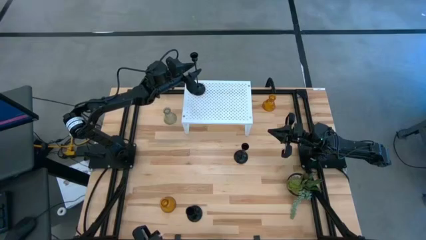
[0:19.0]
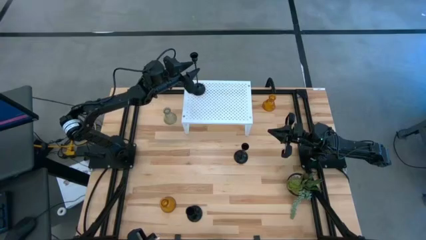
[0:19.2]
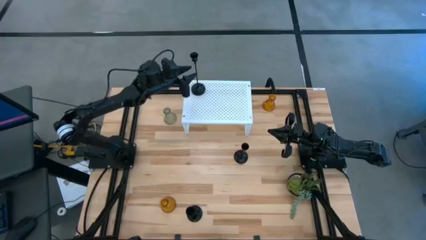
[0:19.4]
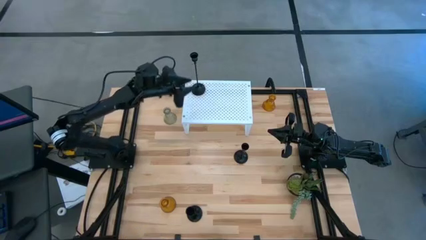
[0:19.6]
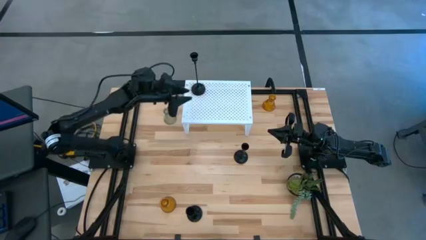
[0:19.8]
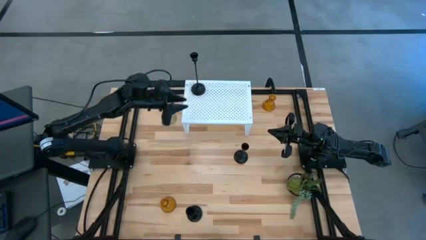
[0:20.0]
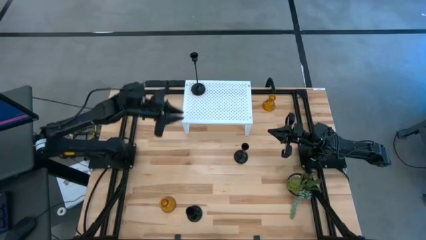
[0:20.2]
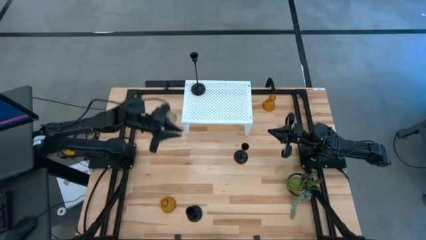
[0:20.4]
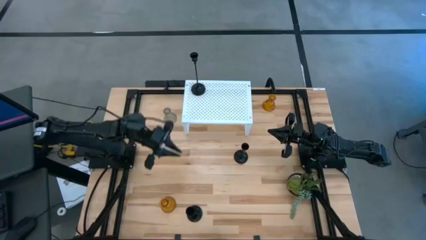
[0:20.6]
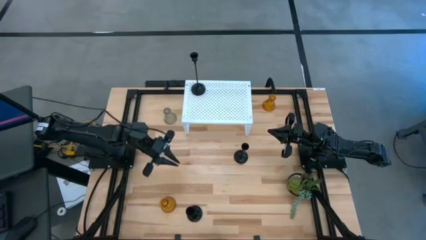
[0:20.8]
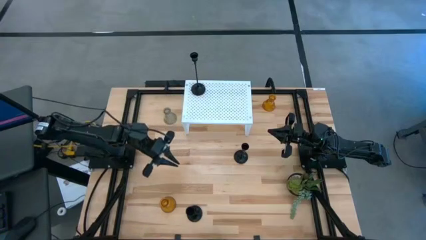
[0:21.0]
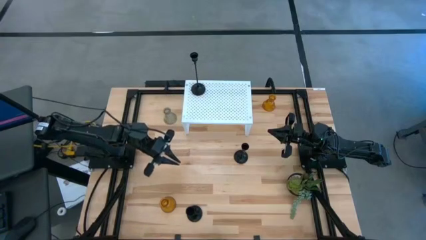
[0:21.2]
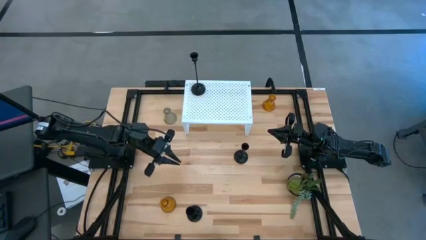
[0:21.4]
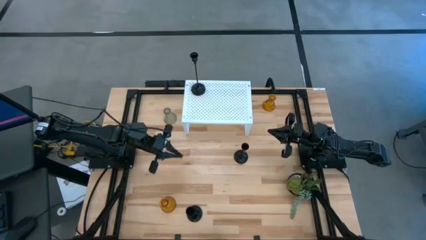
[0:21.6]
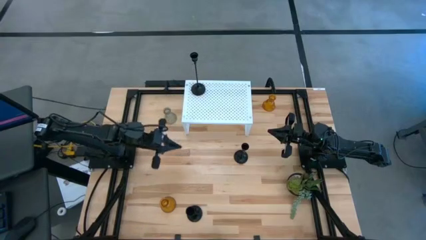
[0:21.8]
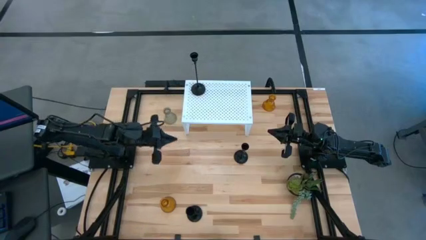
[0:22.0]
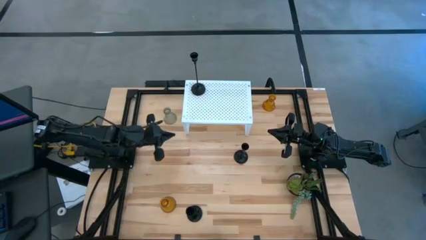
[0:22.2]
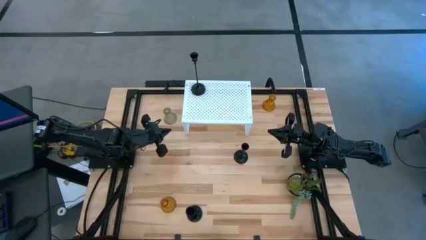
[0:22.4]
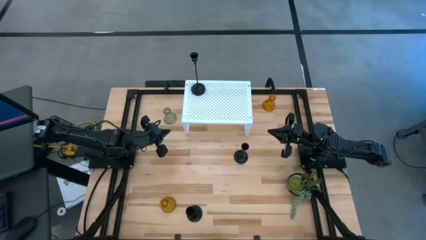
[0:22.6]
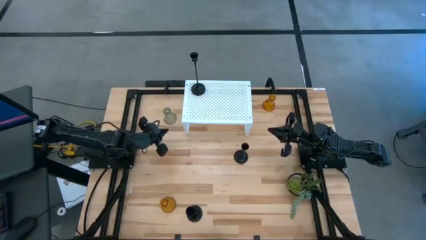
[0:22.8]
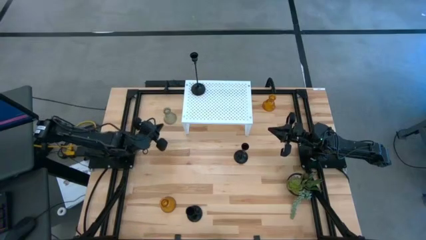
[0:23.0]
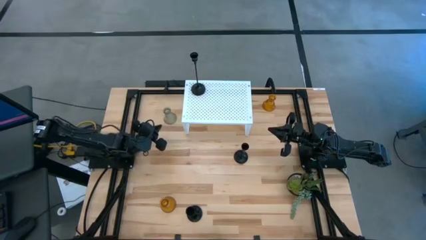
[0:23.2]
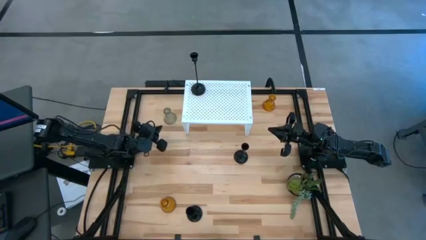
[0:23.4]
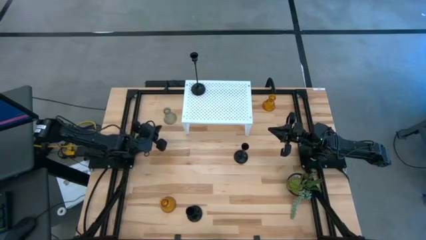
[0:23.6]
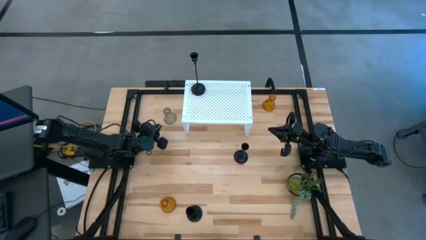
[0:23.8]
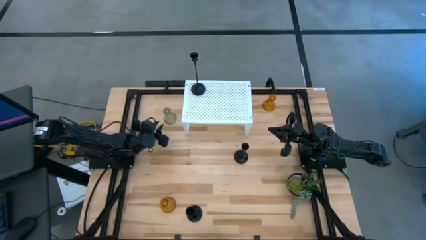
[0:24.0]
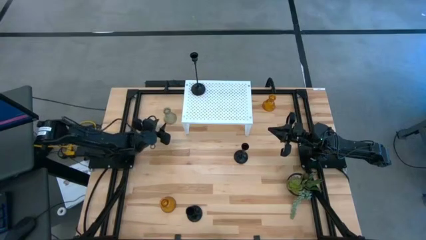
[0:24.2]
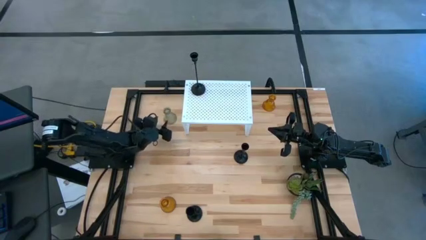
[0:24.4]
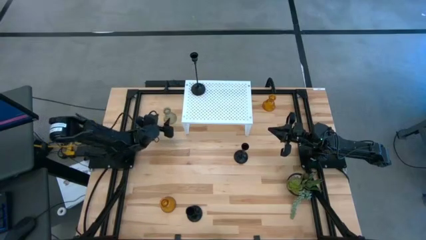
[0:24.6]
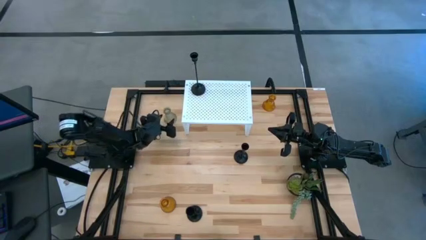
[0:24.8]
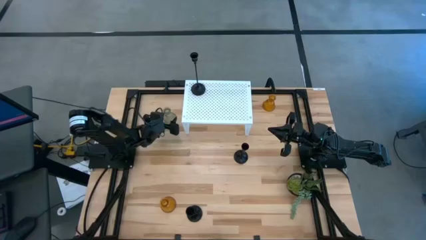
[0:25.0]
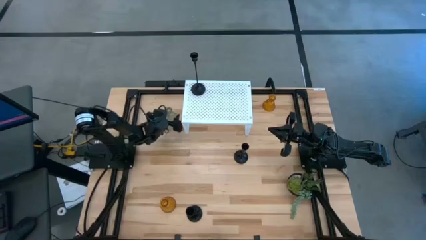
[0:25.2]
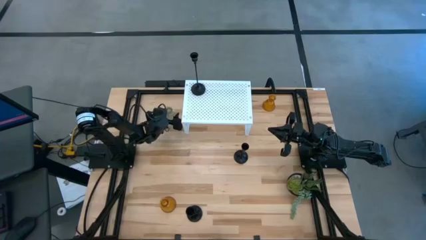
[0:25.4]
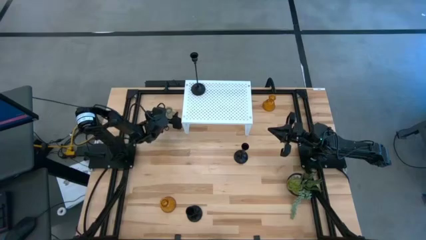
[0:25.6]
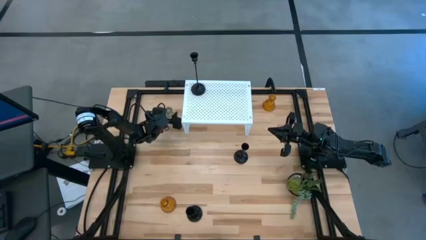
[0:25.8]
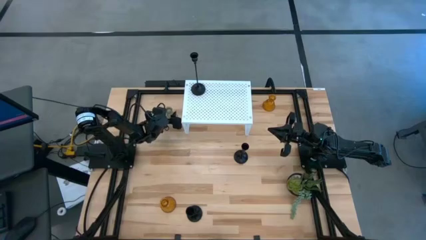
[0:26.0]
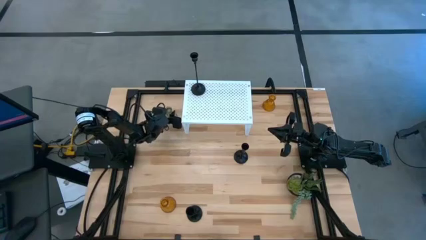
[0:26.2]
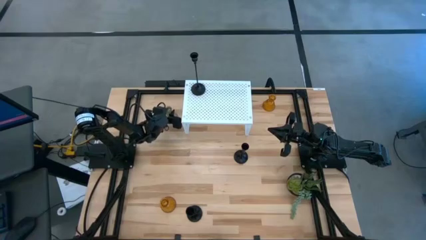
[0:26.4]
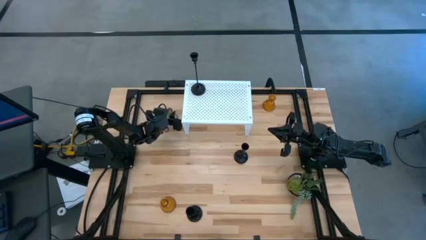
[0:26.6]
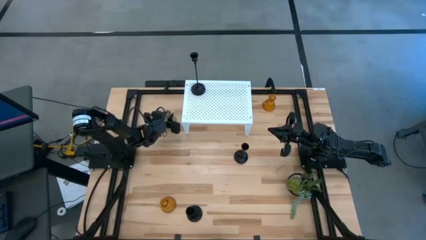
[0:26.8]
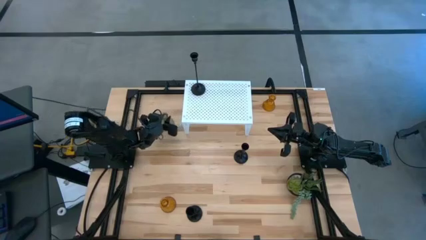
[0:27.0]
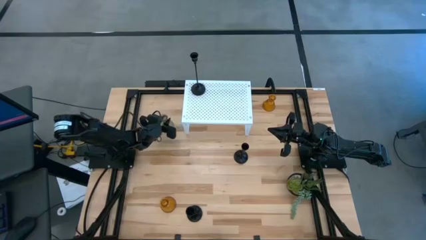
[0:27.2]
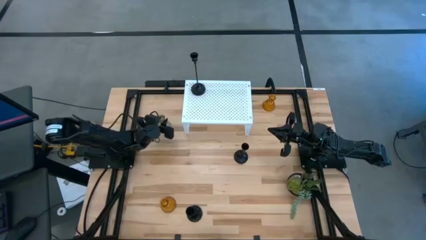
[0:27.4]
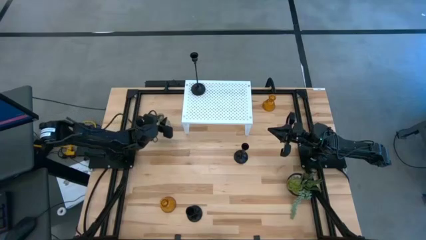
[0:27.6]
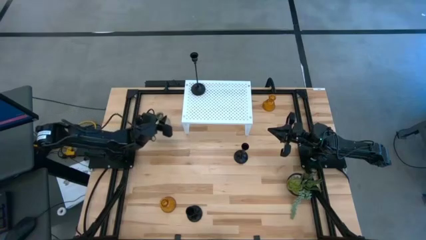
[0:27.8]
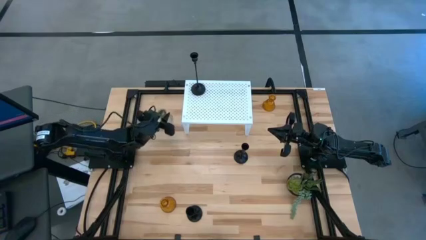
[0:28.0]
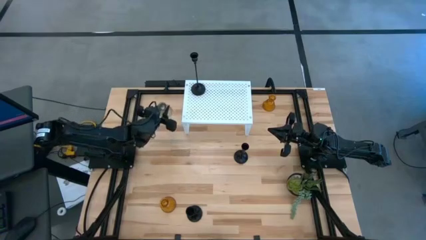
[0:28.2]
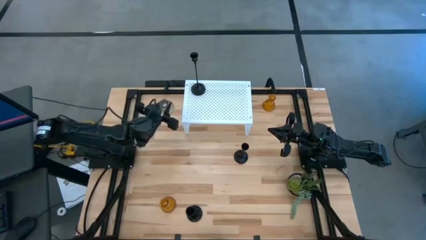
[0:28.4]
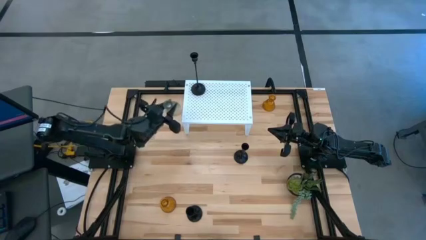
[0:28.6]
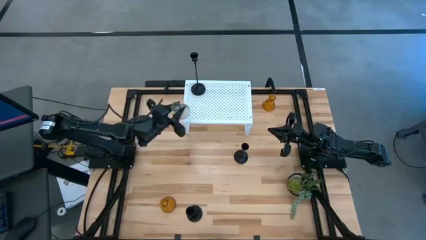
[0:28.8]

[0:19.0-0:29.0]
Task: Pick & Place candle stick holders
Put the transparent glass candle holder on the shelf

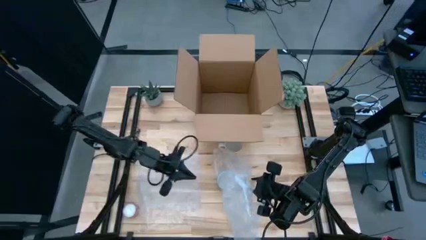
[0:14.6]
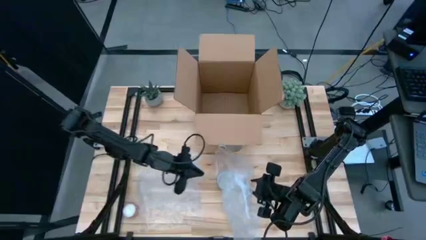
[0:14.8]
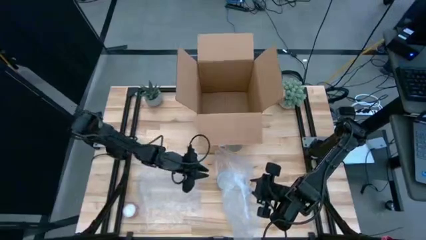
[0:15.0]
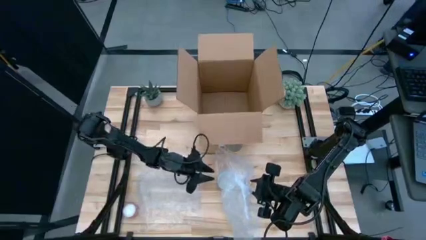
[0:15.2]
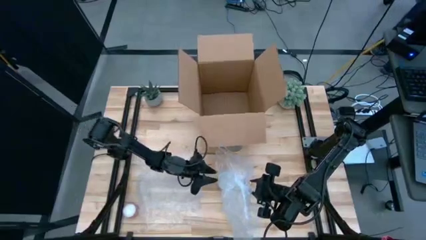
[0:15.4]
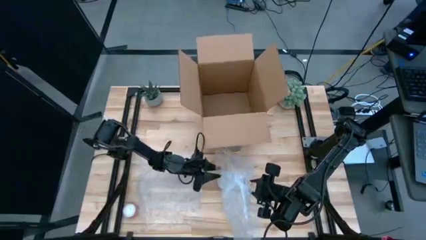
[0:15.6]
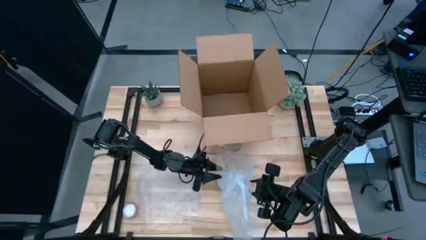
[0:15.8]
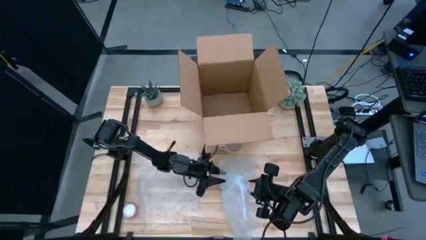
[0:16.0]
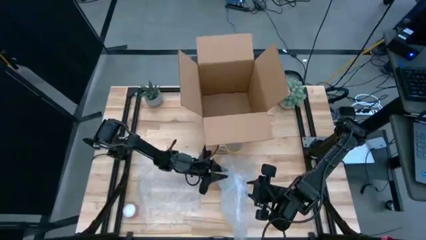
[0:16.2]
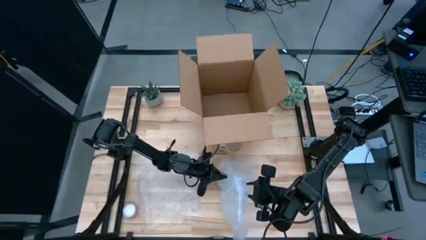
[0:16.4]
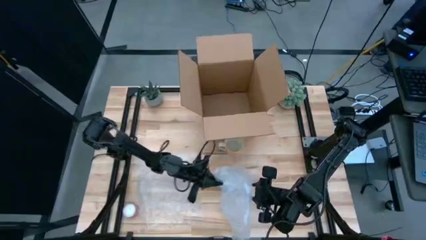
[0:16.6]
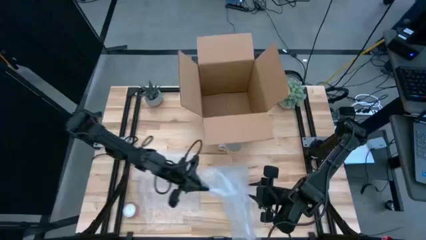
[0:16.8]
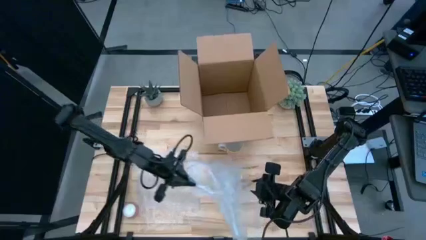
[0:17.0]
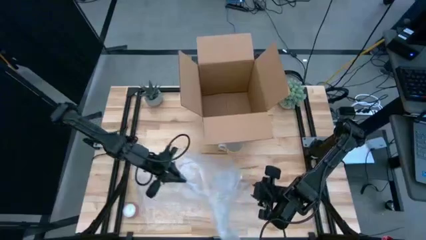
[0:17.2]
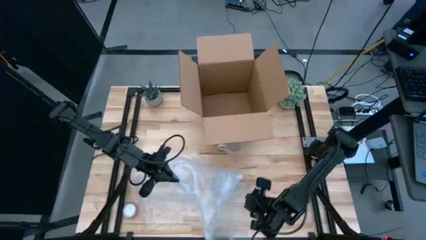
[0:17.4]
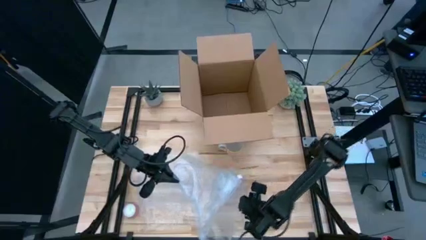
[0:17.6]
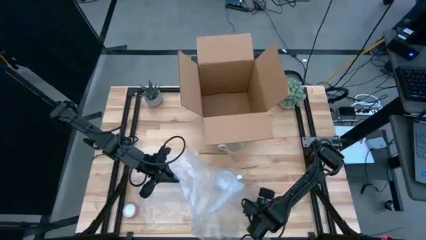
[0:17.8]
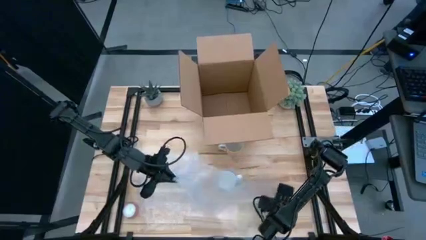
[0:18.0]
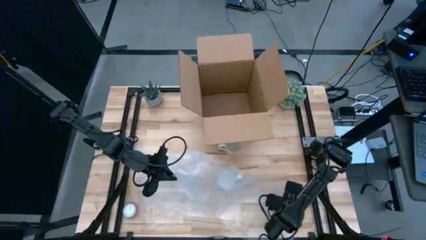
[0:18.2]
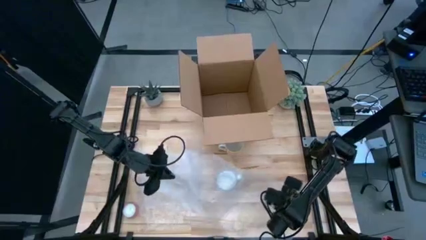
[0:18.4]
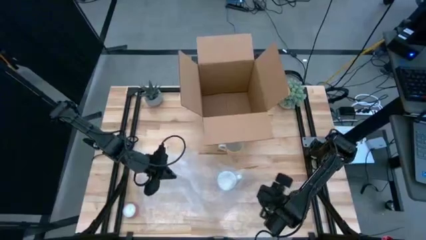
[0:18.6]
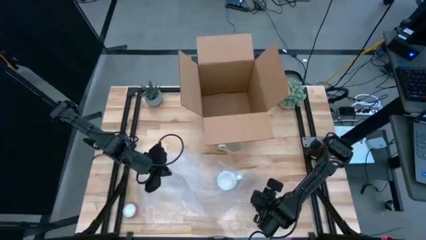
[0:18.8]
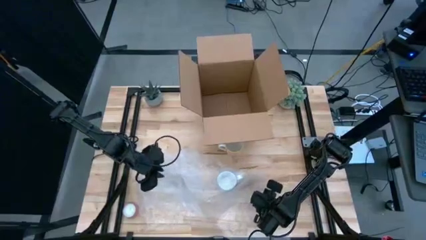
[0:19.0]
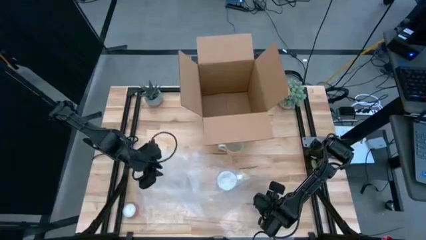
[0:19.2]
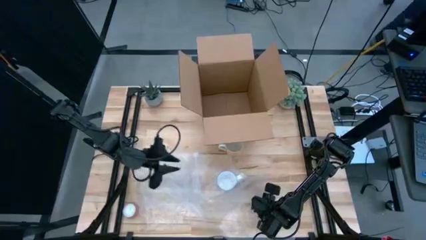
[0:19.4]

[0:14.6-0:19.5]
Task: wrap mug
Prepare the right transparent bubble wrap
